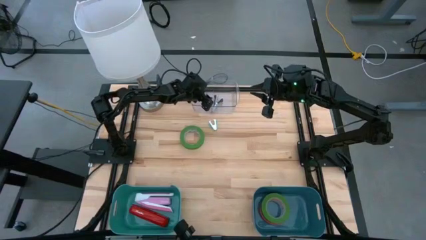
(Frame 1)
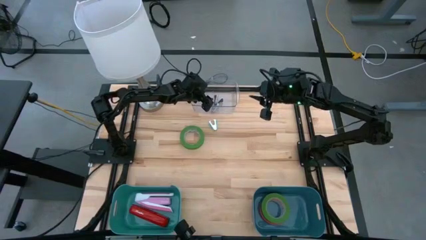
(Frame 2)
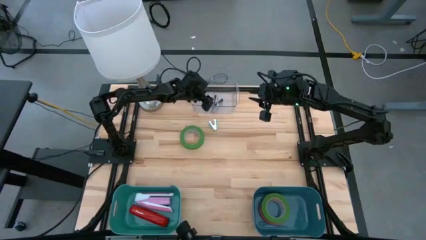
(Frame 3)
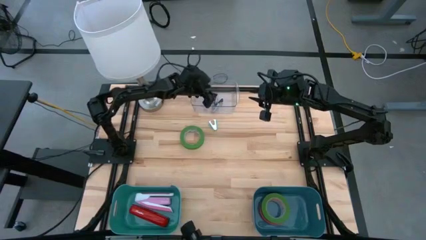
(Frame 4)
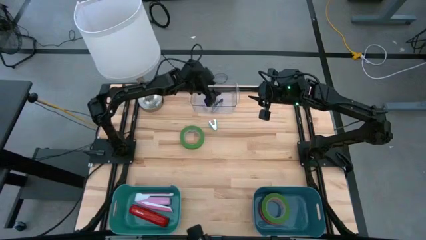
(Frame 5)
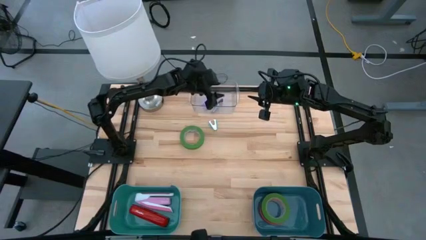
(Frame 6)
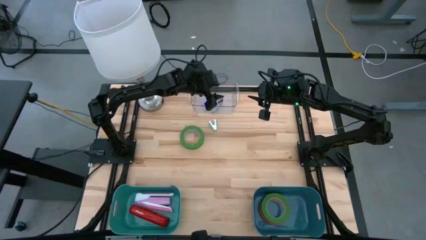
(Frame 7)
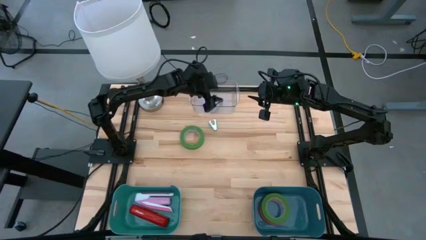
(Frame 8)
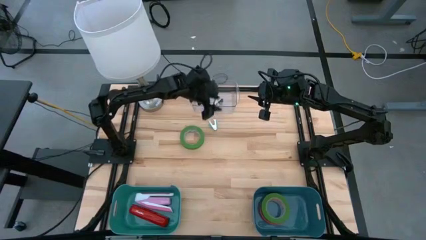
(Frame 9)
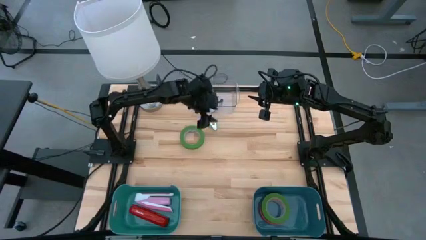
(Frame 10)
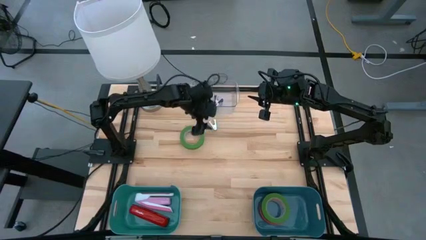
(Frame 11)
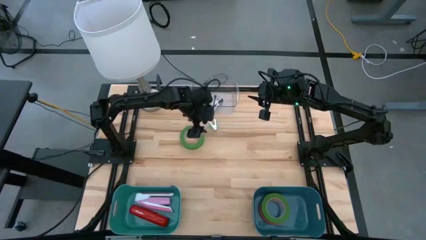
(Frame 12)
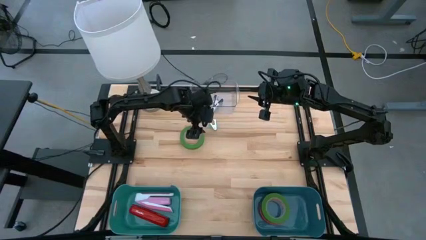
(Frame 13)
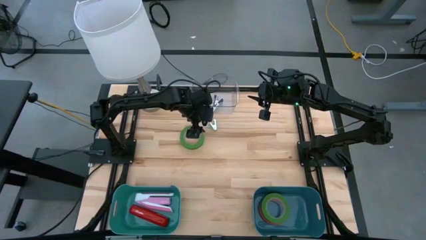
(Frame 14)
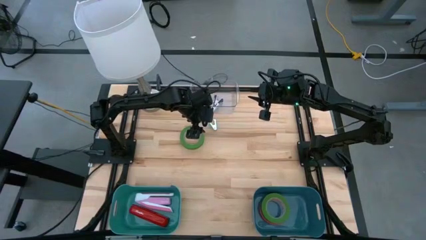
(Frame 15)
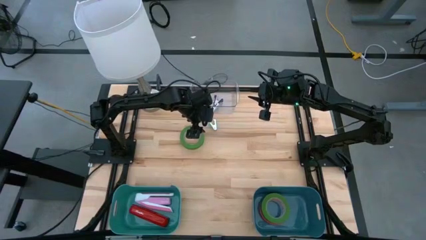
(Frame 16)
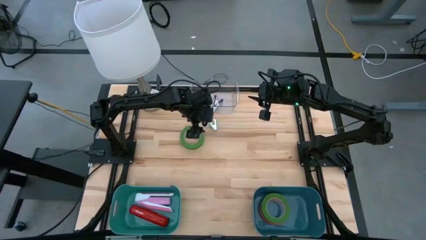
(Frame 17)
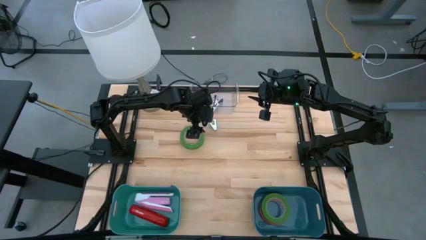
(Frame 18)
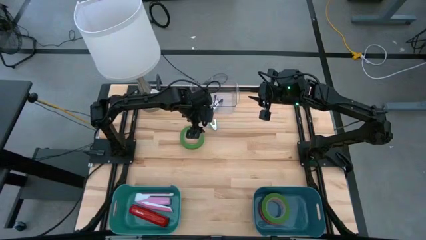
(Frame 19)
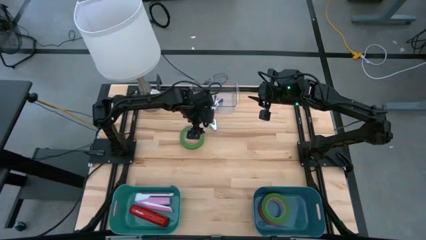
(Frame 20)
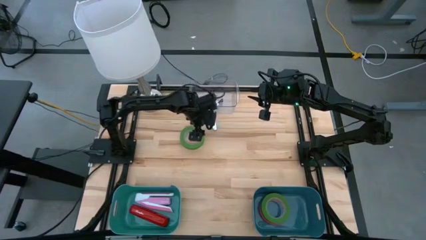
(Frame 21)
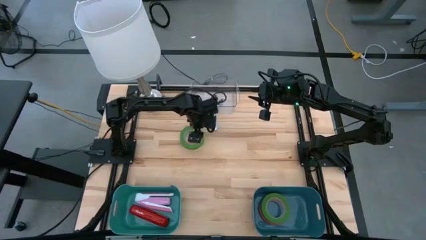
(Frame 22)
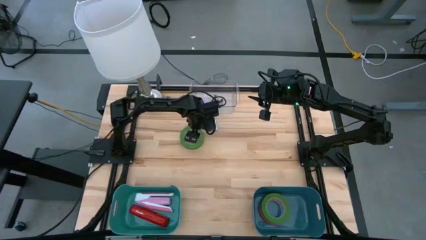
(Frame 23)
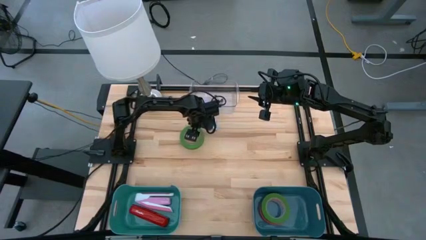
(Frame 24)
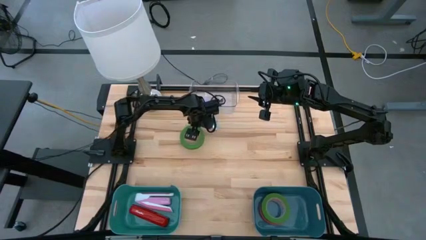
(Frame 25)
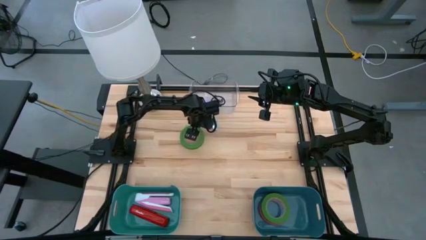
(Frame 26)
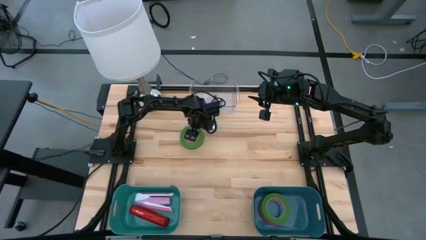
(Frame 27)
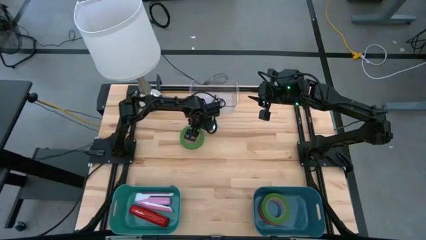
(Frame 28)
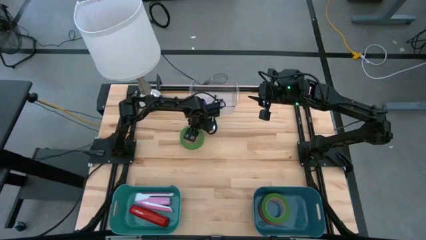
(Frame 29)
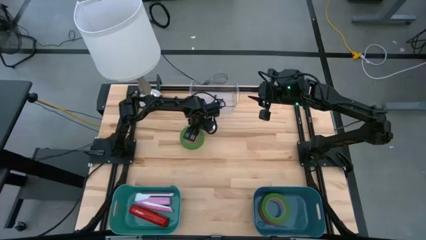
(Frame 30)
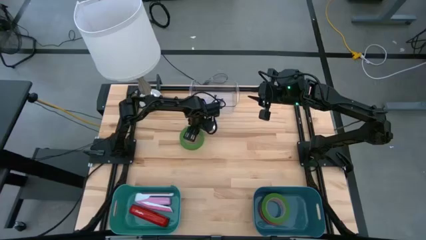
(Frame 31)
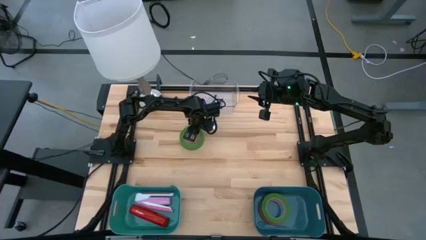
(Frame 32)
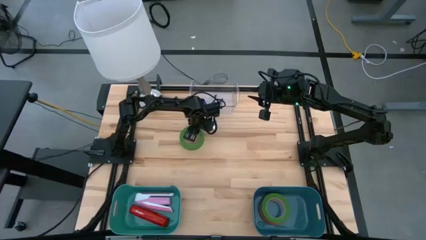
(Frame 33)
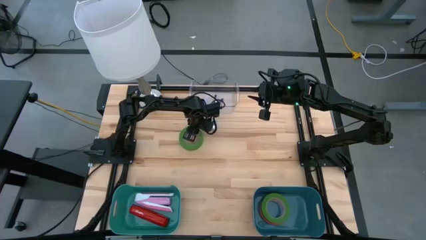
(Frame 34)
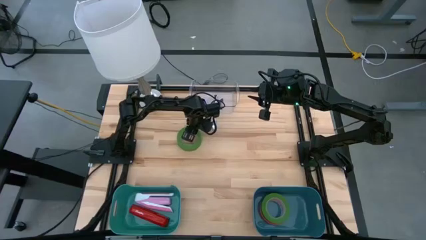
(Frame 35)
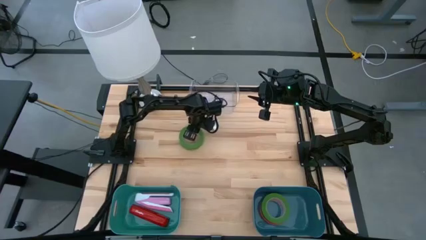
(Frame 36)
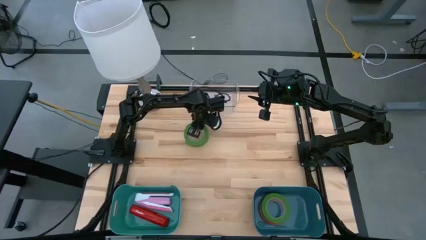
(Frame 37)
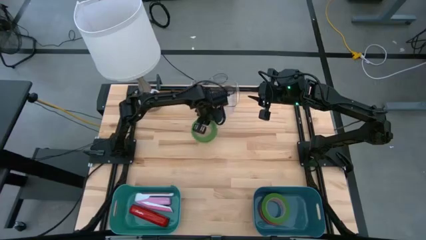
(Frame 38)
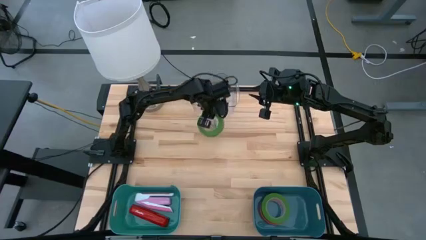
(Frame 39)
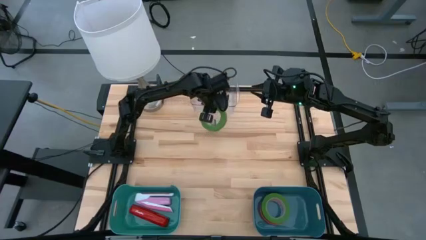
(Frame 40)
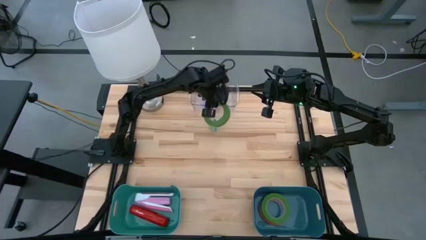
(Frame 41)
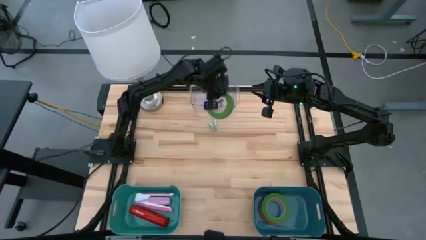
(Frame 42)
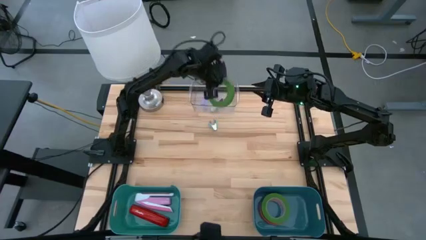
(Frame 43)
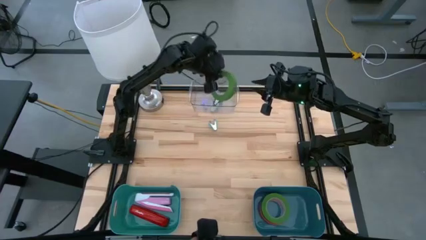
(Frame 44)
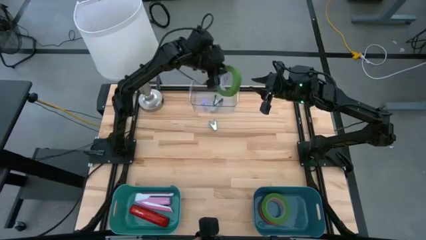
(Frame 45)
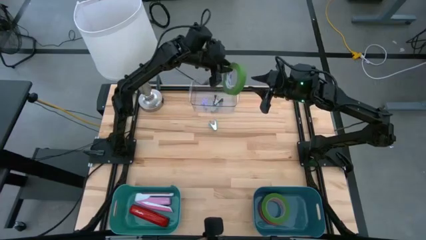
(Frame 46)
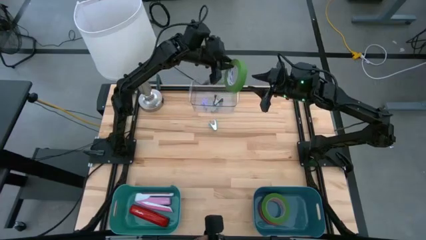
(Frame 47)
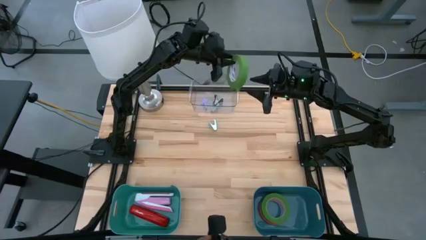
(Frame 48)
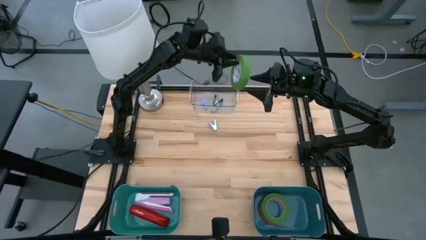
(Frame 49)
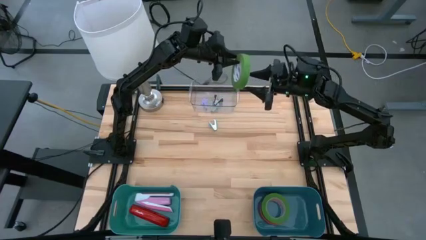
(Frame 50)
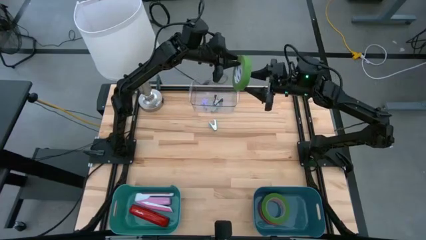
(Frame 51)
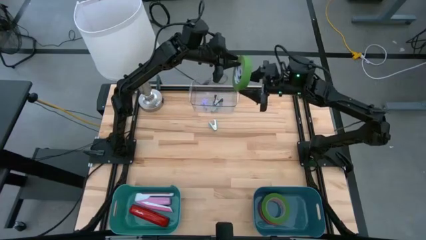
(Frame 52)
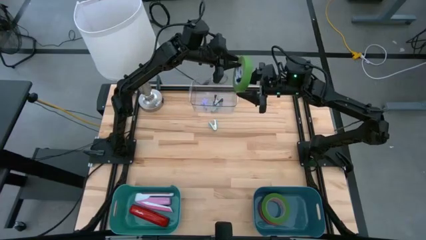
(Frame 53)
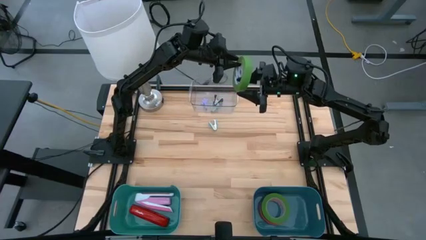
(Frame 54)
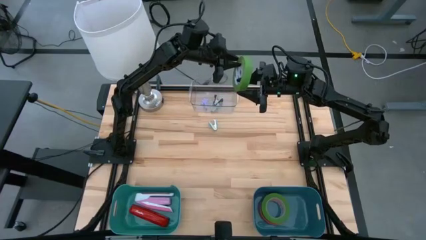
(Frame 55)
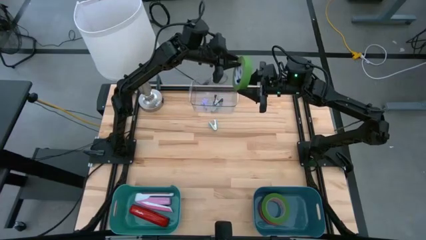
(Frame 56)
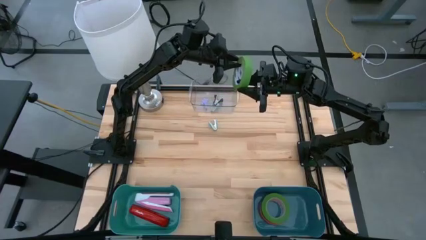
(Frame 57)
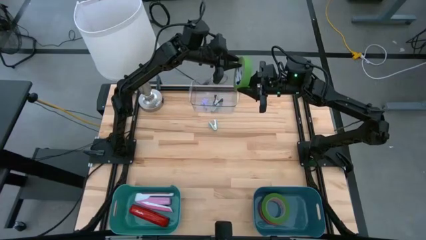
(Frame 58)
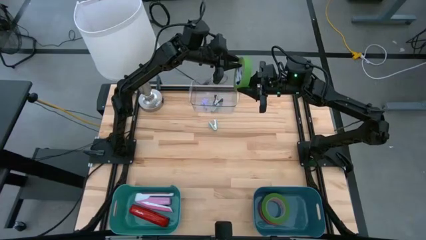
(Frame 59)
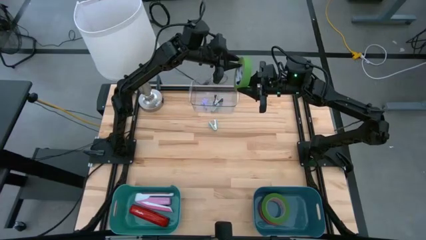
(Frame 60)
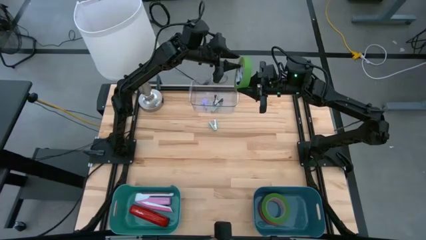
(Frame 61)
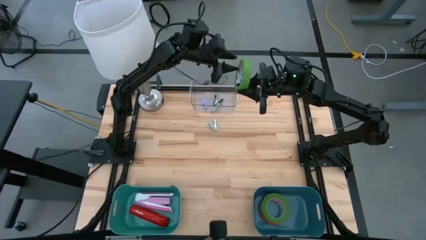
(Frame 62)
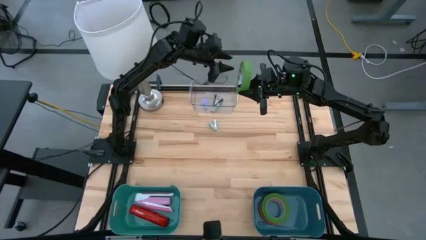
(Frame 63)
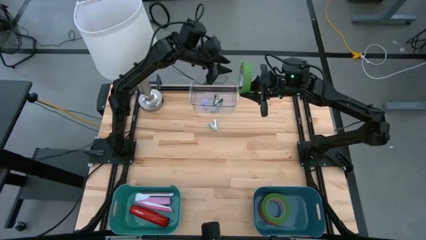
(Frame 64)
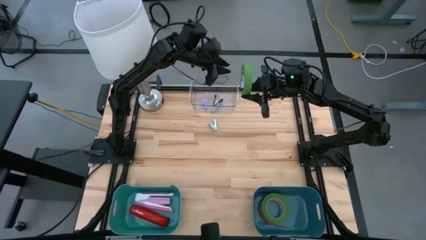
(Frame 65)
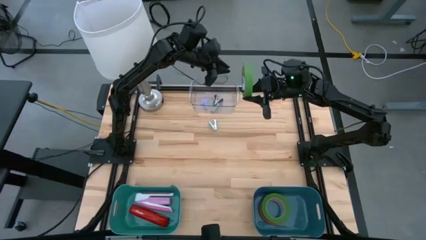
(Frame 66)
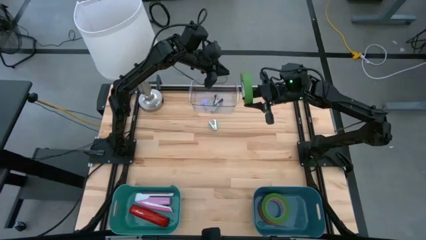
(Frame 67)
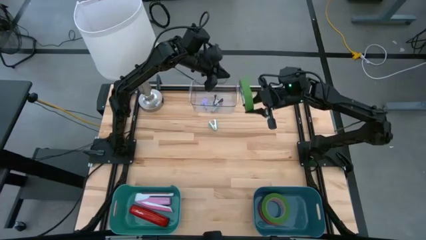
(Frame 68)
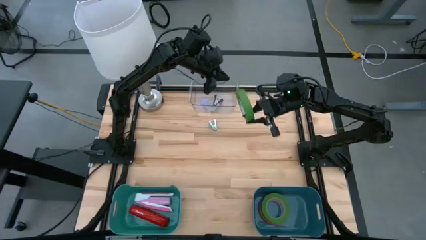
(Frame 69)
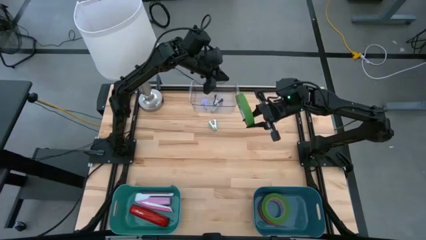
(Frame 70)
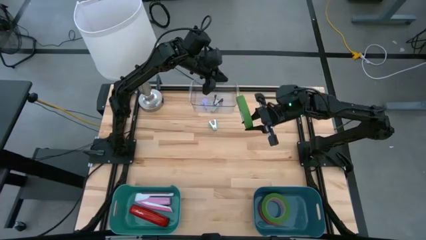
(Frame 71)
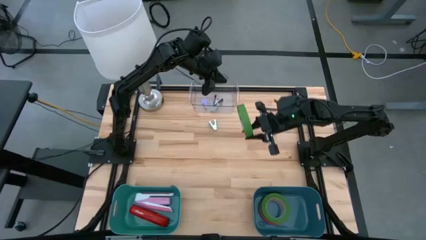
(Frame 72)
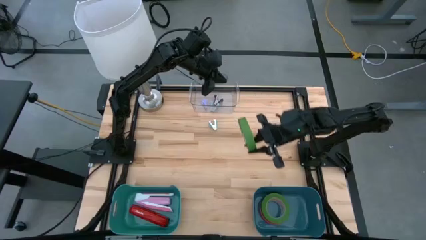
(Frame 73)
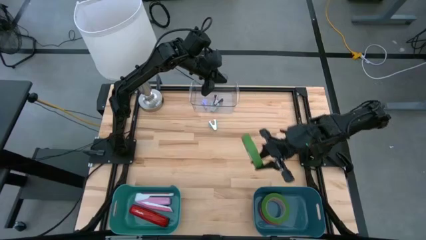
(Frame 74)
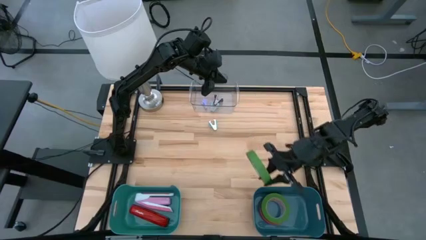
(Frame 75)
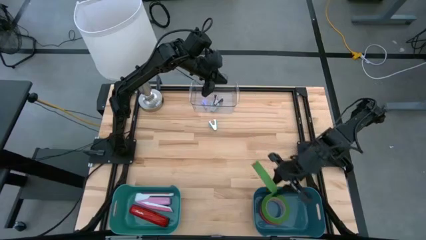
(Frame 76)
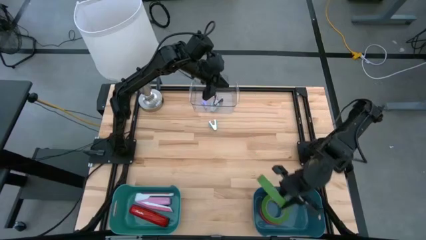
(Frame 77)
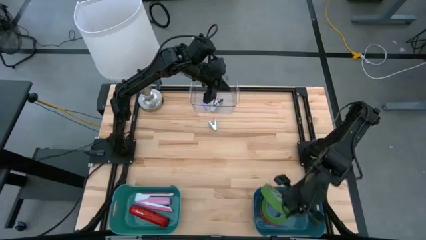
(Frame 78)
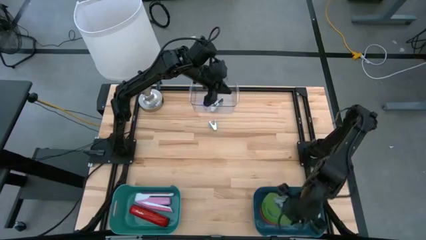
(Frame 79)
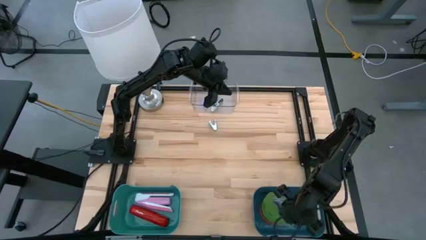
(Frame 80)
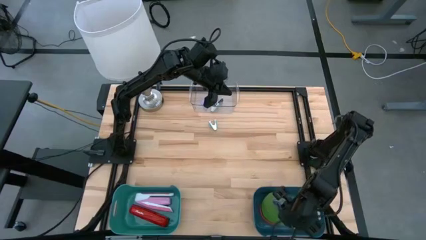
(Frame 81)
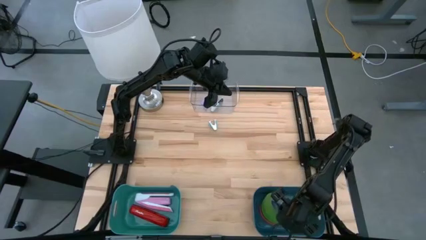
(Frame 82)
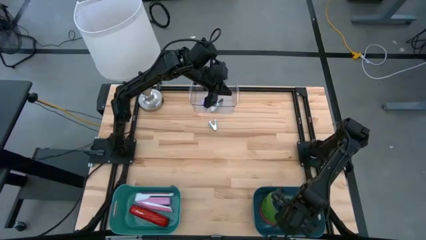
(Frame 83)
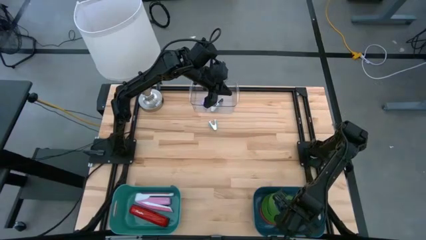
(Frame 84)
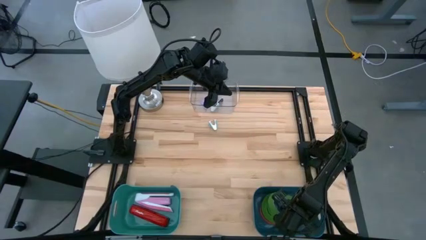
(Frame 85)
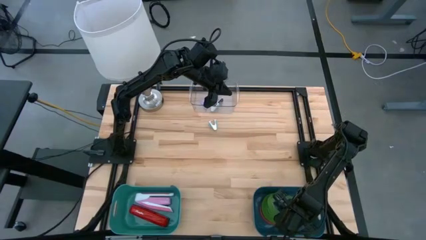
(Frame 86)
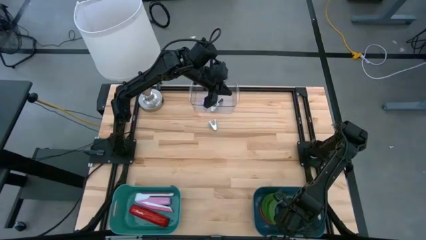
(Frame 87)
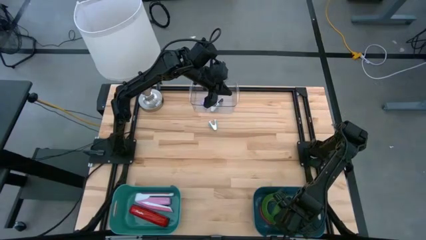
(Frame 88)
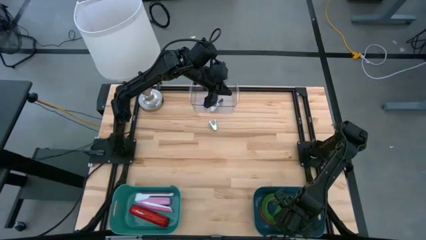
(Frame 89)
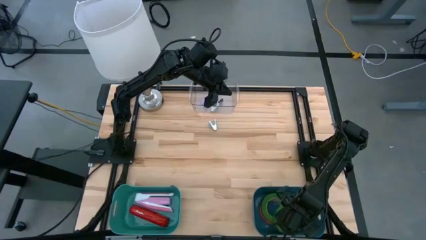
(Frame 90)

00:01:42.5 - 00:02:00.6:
Task: Pick and place Stapler, Stapler remover, tape
Put the green tape into the blue bin
